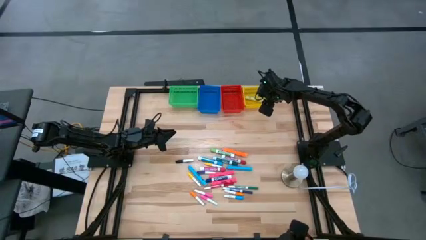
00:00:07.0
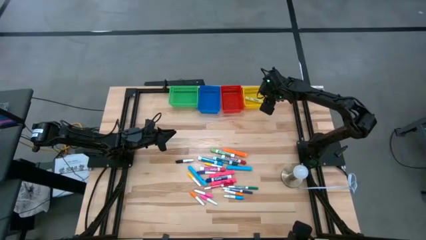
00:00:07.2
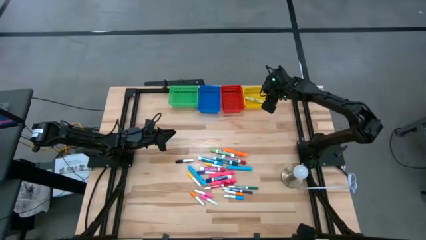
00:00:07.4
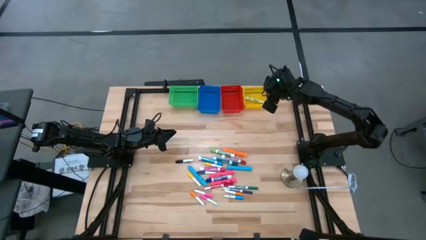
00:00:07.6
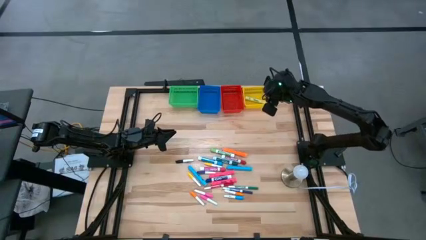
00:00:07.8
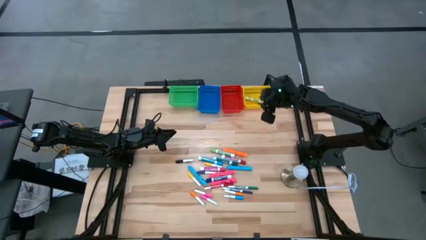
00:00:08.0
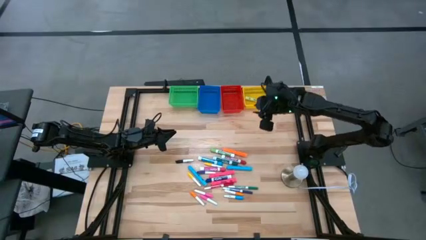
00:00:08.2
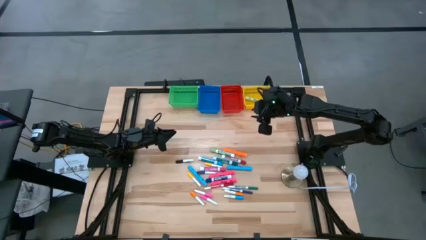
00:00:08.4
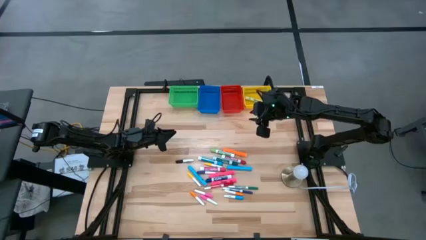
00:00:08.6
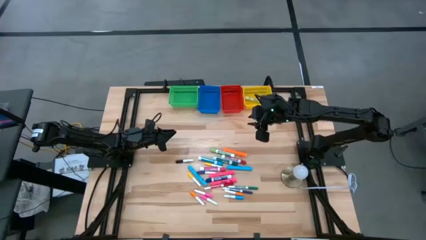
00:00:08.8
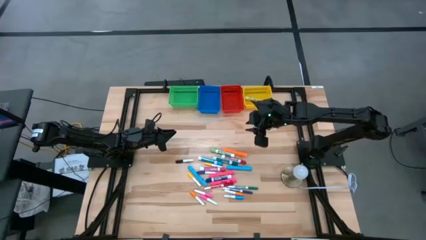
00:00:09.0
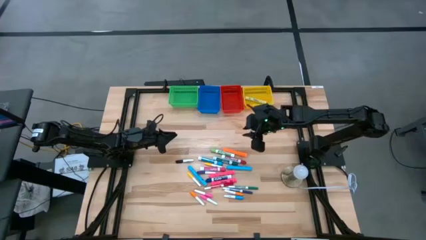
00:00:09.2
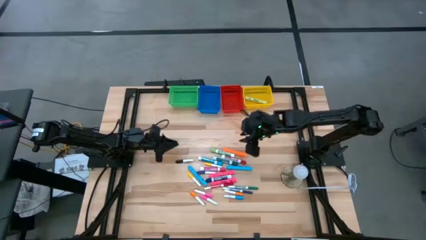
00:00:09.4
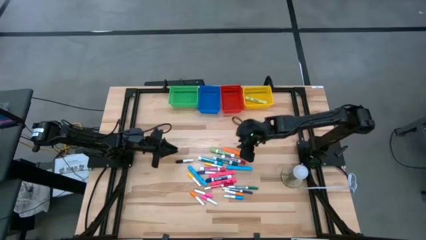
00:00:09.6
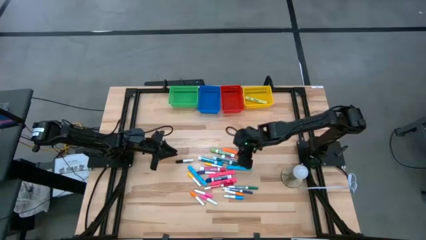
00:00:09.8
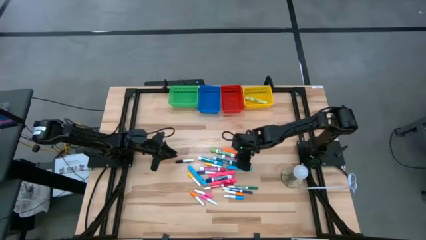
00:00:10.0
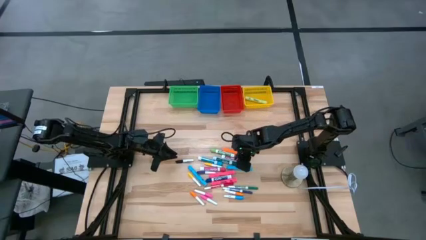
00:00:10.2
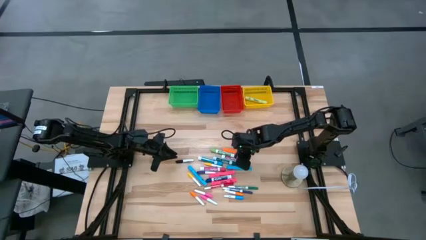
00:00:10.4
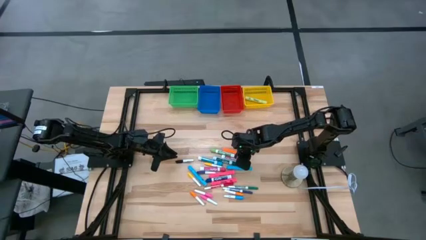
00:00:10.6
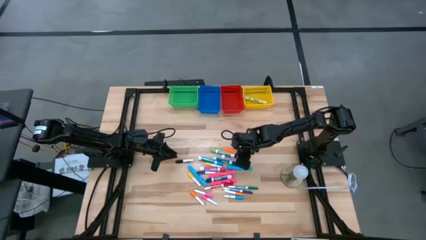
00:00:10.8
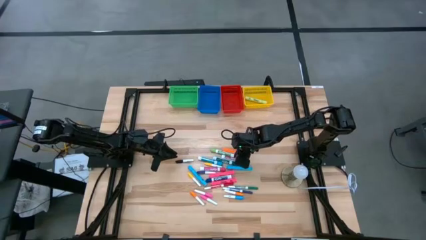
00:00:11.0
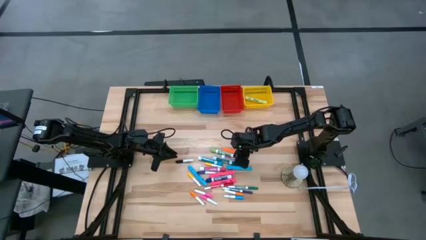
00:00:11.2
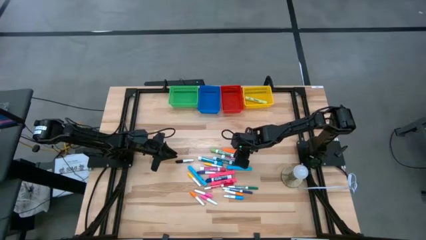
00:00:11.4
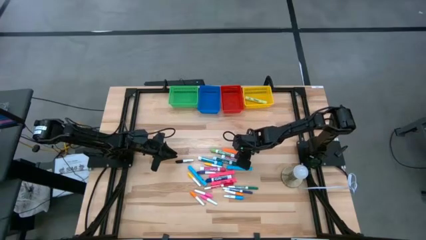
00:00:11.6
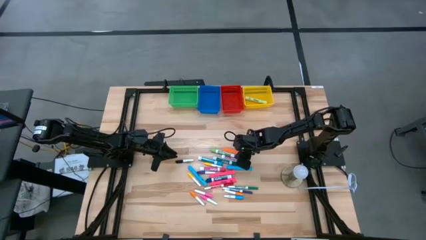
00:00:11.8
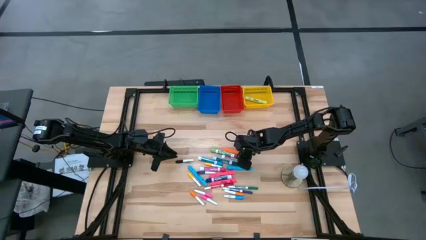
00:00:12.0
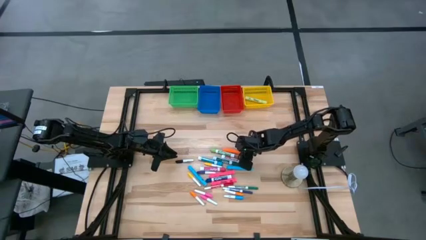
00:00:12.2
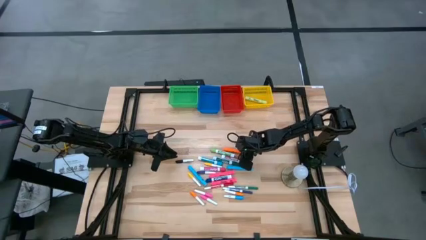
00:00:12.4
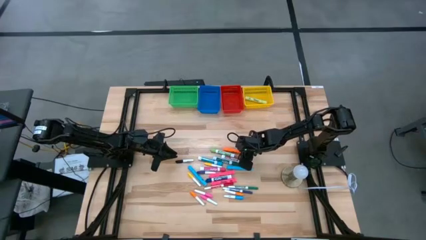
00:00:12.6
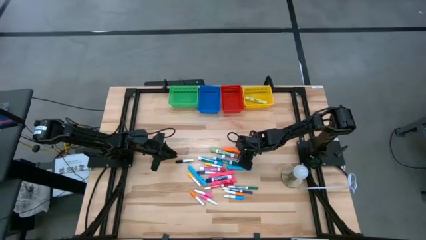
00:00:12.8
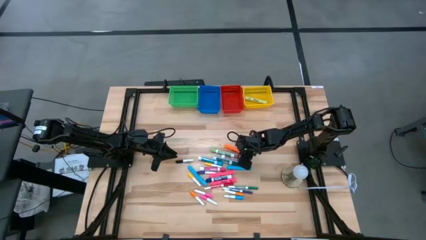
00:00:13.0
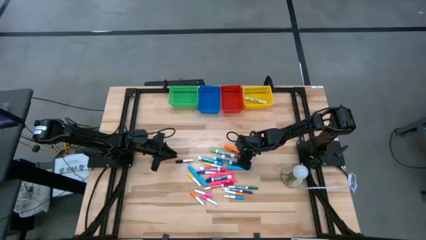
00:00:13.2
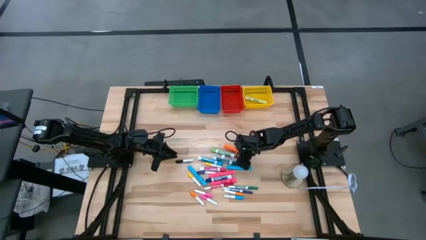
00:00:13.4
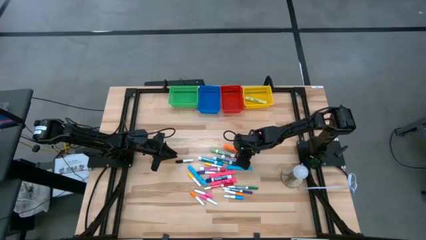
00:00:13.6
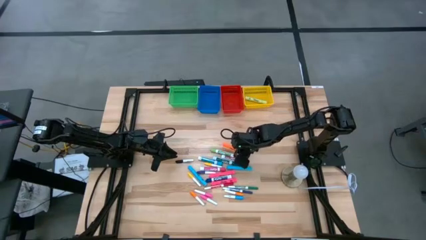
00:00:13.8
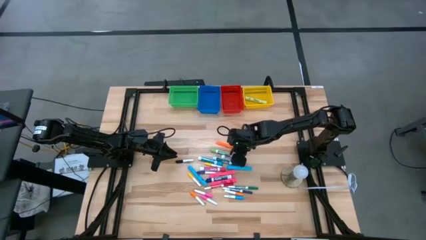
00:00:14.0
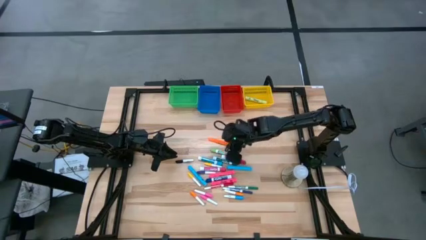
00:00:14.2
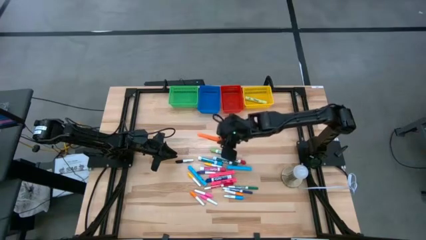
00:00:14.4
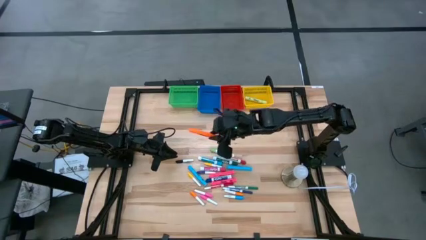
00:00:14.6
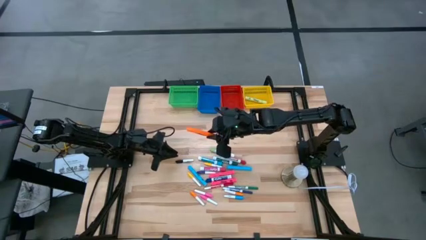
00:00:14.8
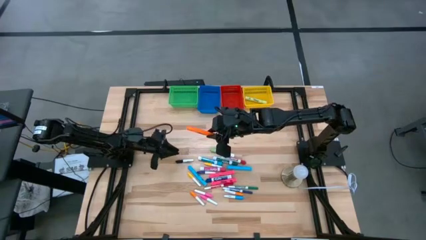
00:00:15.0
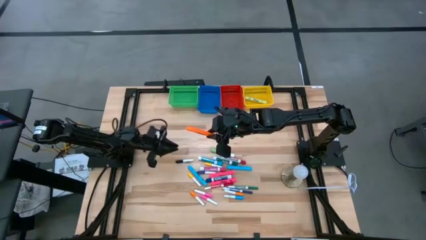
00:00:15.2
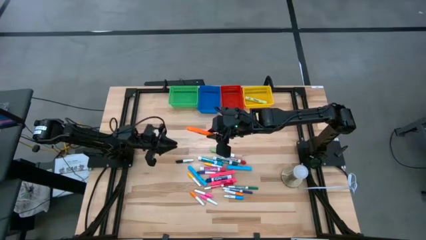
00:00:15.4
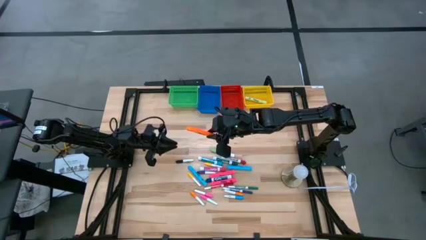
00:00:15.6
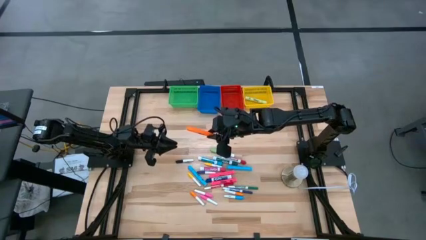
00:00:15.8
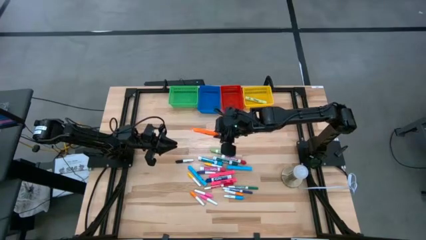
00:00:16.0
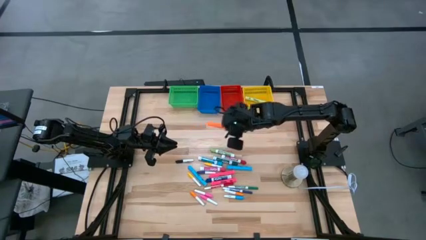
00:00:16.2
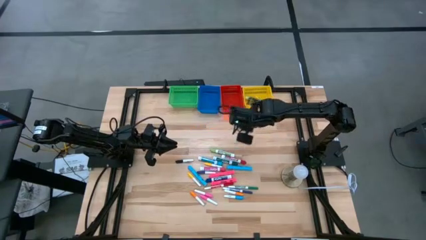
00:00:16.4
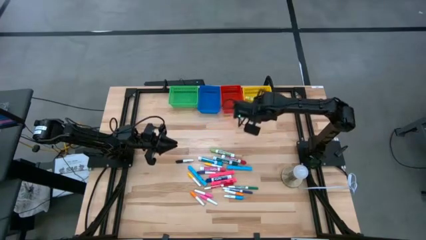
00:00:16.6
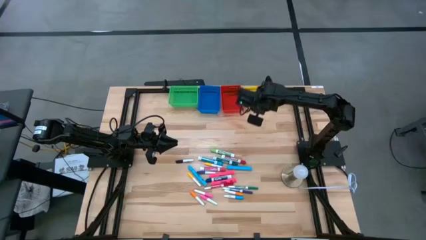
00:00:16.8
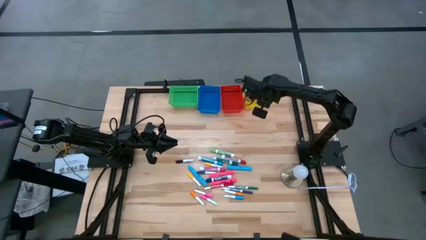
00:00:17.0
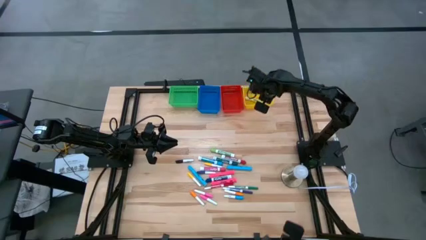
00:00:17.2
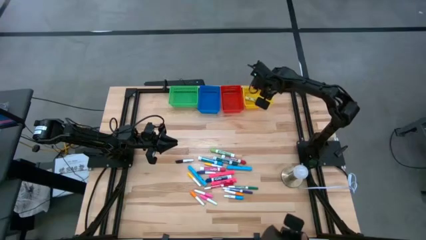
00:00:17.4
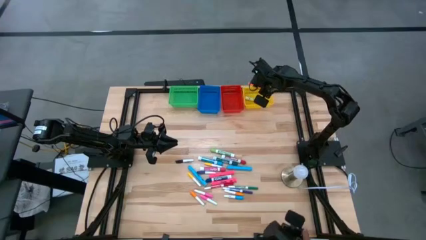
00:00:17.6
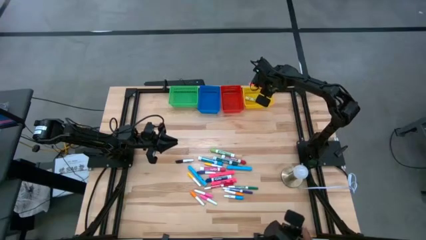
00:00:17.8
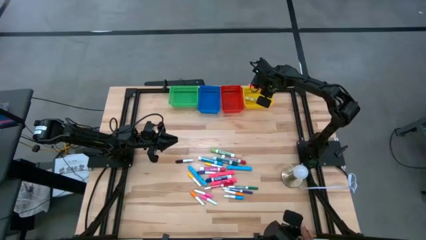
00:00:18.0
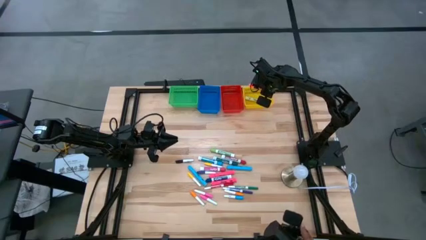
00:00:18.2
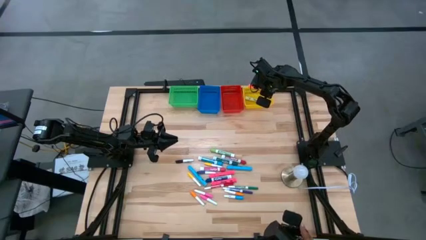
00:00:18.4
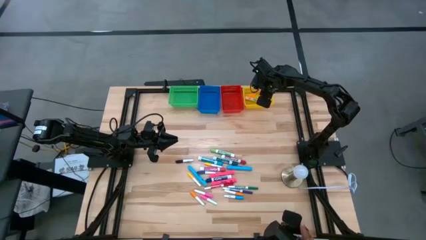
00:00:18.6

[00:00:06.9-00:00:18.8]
Task: Pick & Place Markers
Put the large orange highlighter pen into the yellow bin

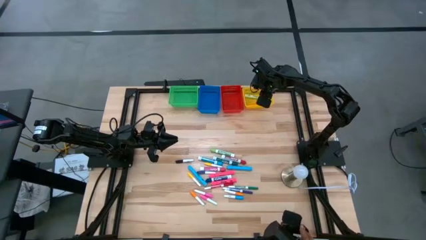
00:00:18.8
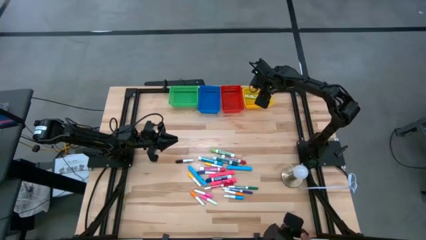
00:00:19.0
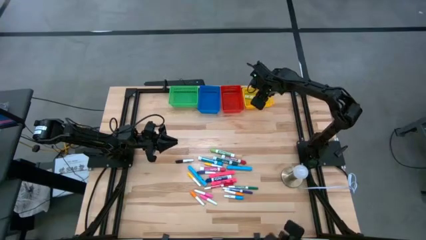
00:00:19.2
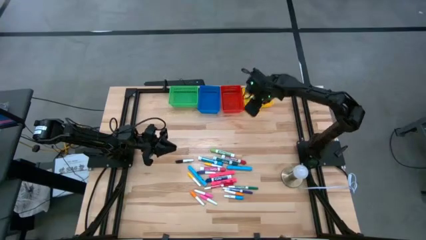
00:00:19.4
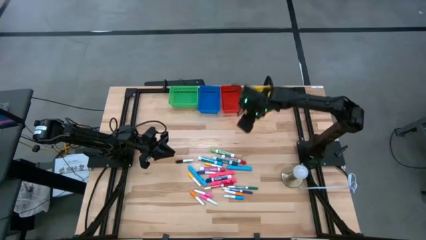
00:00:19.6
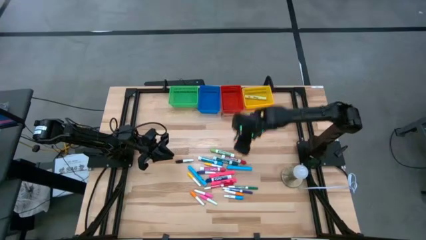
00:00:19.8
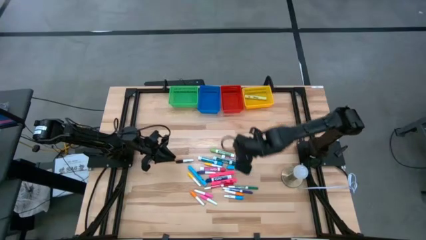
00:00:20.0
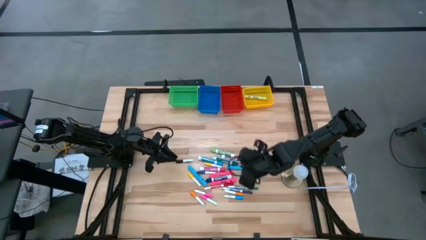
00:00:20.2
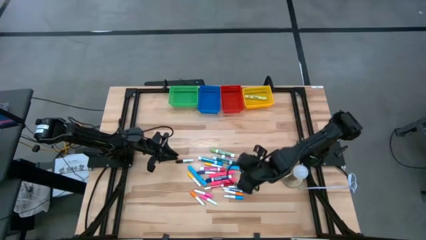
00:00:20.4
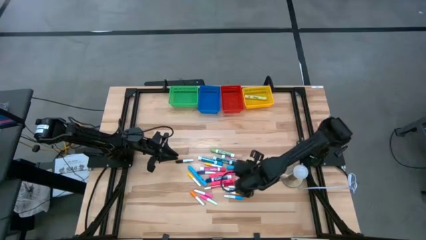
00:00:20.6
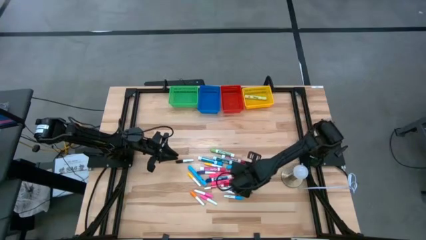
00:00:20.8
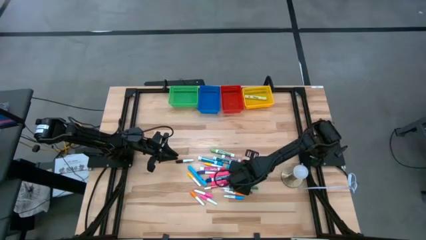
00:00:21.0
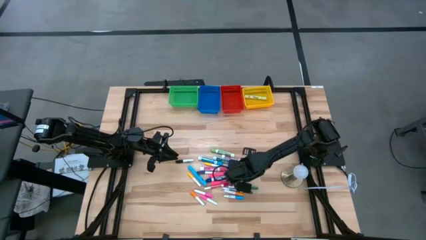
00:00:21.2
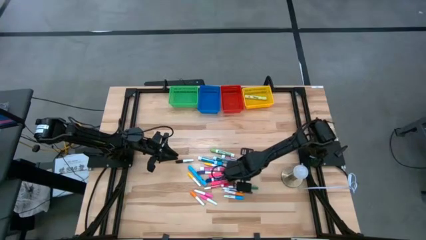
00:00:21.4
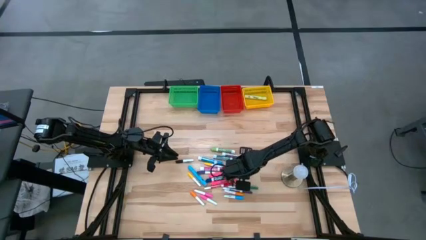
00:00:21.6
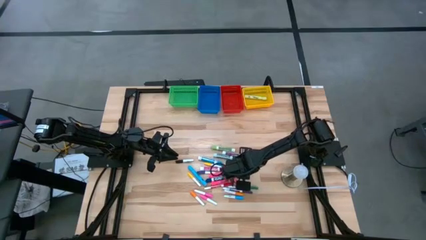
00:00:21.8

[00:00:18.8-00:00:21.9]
Put the right large light blue highlighter pen into the yellow bin

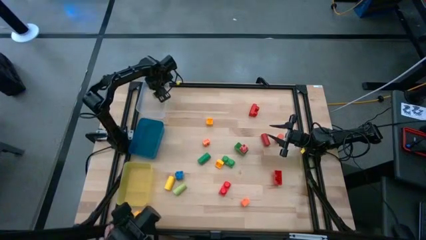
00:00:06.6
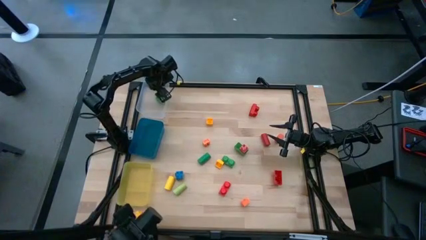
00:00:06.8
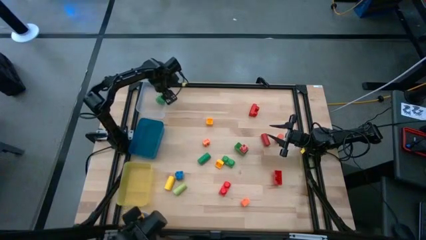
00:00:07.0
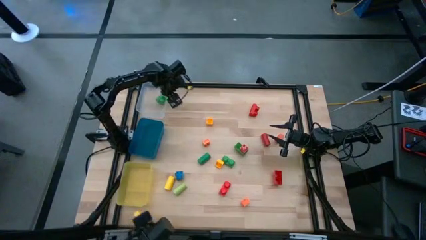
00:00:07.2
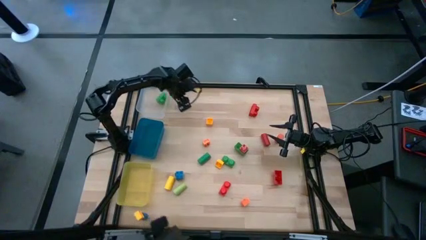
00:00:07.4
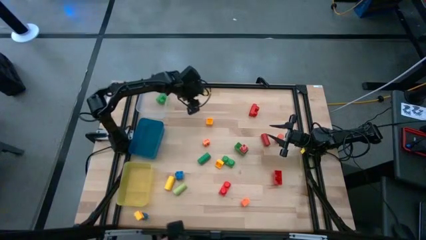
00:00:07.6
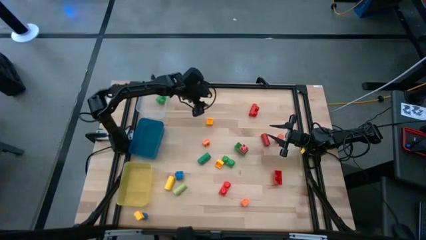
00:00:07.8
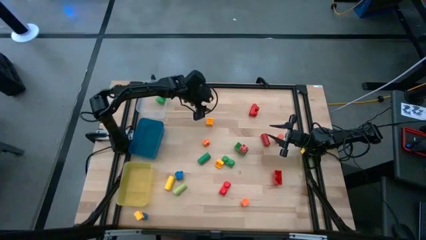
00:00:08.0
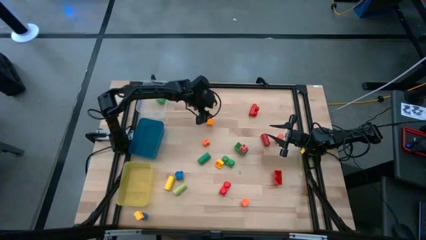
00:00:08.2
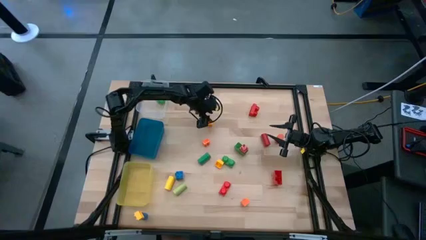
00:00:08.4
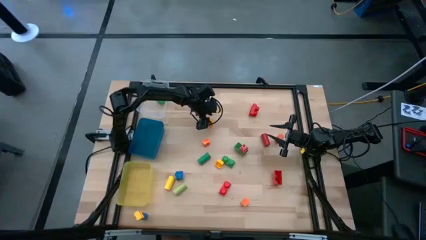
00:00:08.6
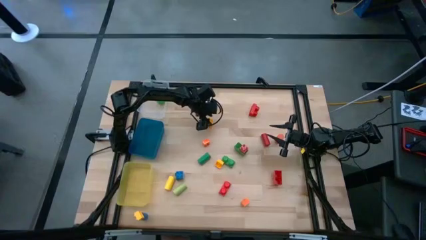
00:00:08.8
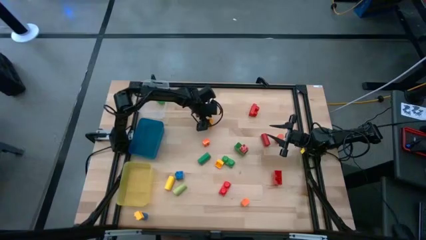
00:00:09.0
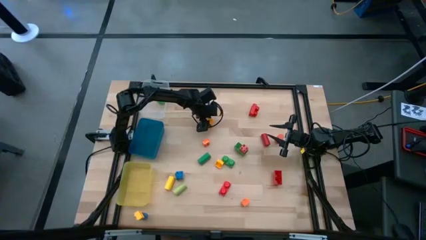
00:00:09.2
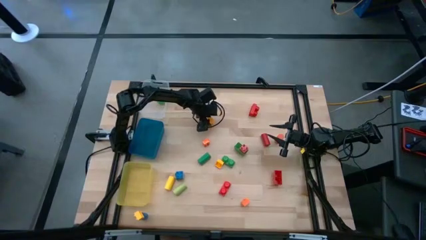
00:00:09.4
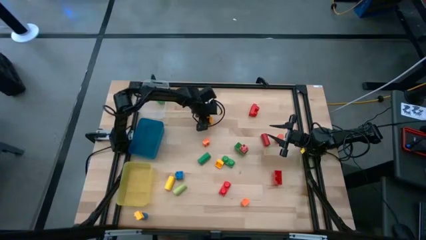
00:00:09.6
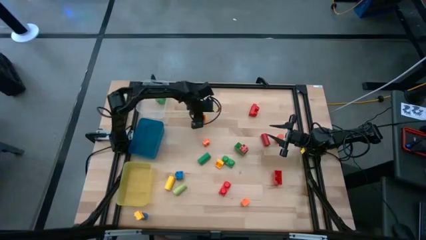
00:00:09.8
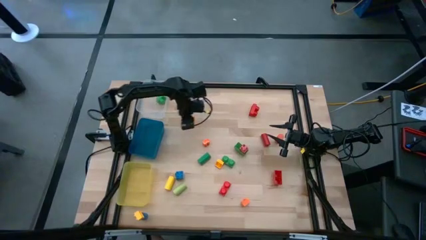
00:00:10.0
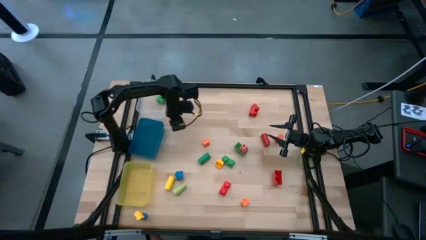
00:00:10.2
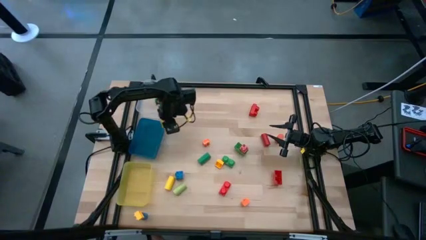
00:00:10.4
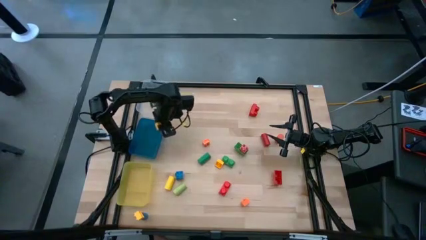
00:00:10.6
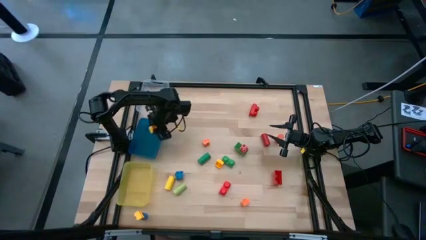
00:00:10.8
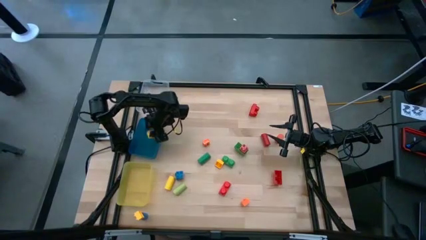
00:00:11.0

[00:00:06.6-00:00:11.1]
Task: Sort blocks by size
Put the top yellow 4 stud game piece into the blue bin
